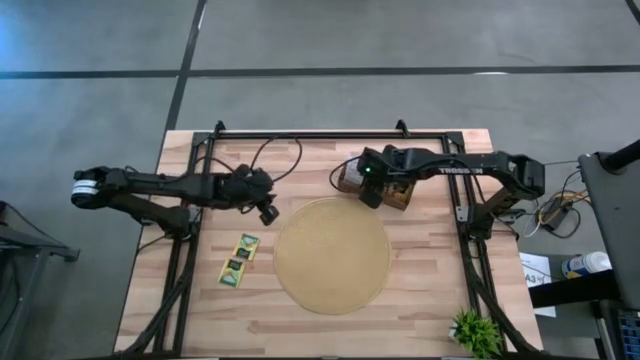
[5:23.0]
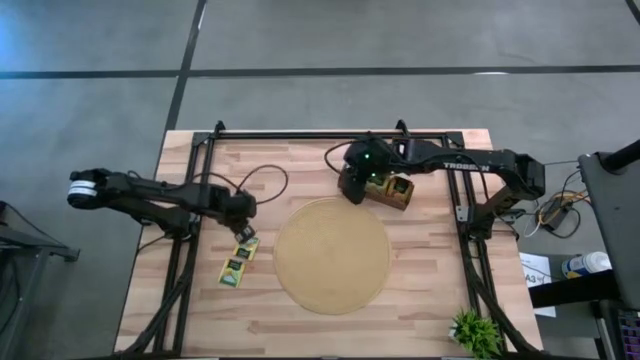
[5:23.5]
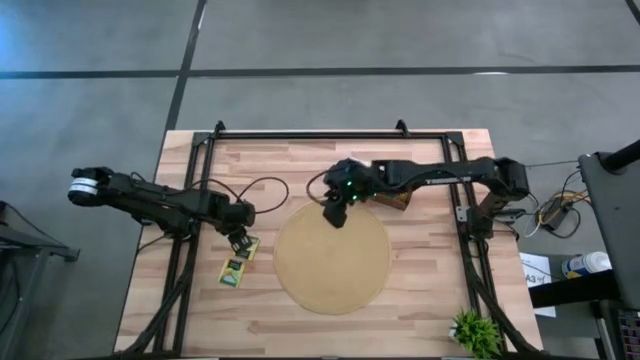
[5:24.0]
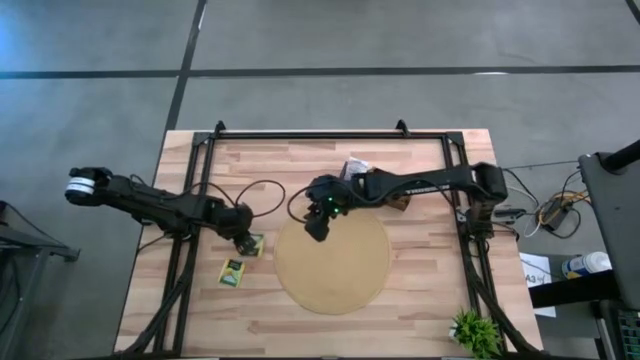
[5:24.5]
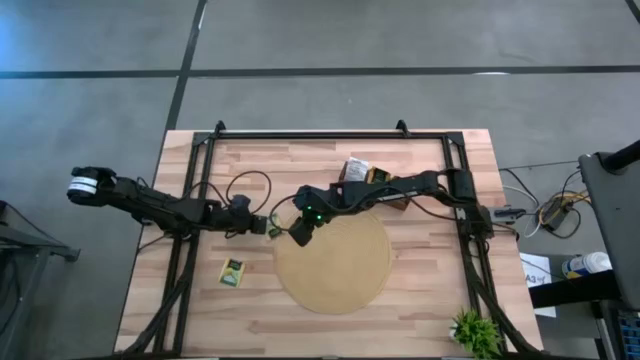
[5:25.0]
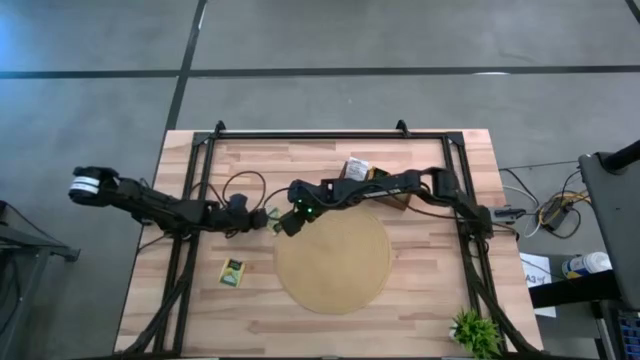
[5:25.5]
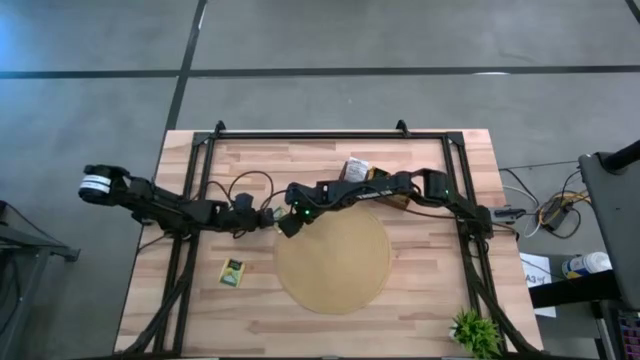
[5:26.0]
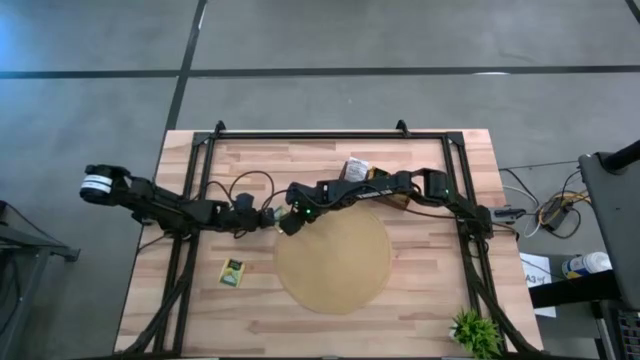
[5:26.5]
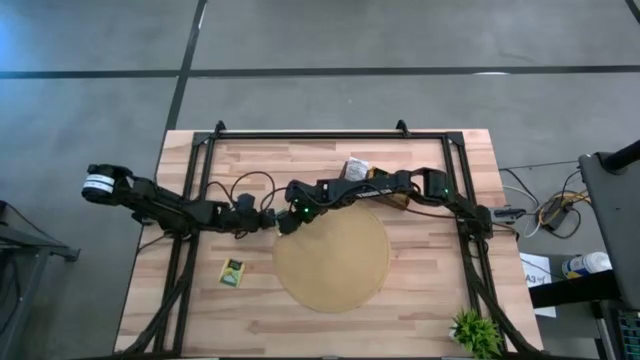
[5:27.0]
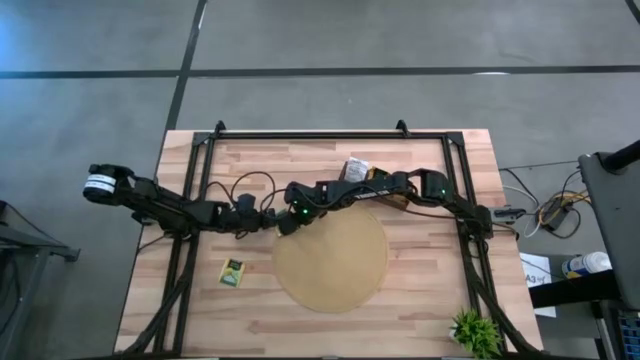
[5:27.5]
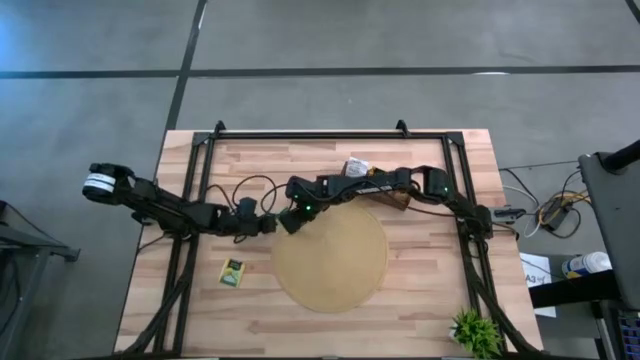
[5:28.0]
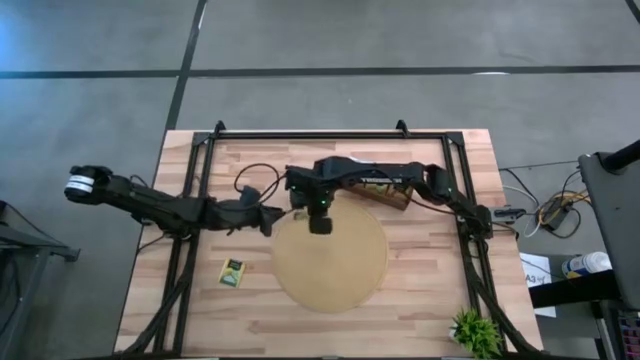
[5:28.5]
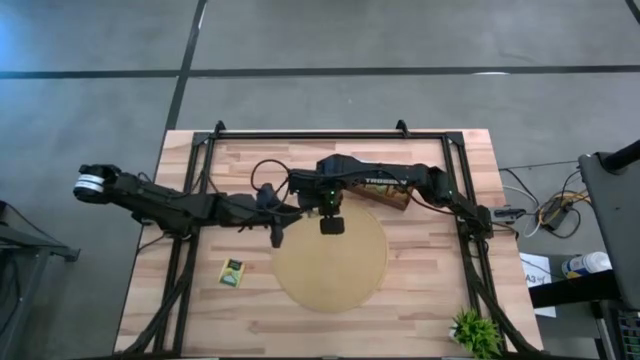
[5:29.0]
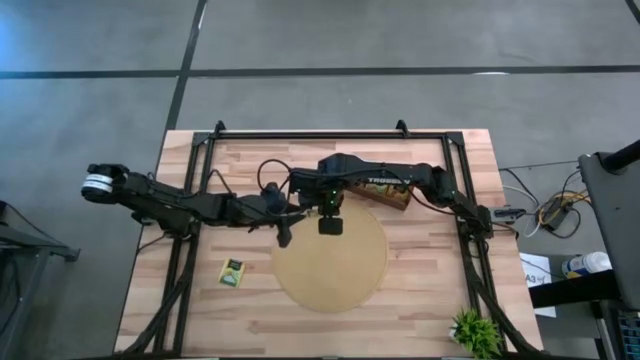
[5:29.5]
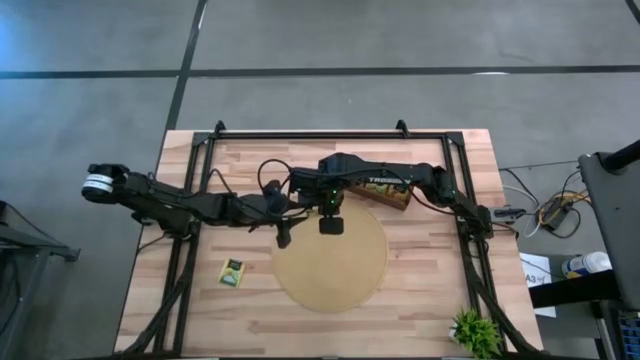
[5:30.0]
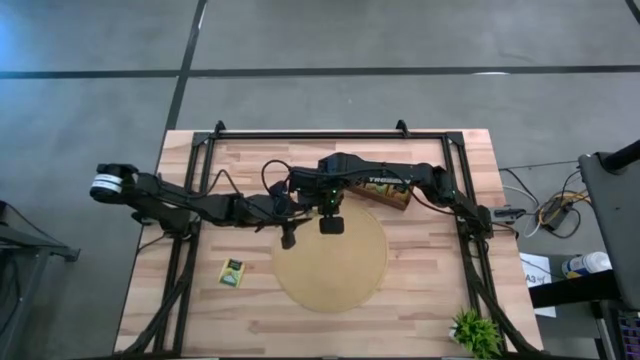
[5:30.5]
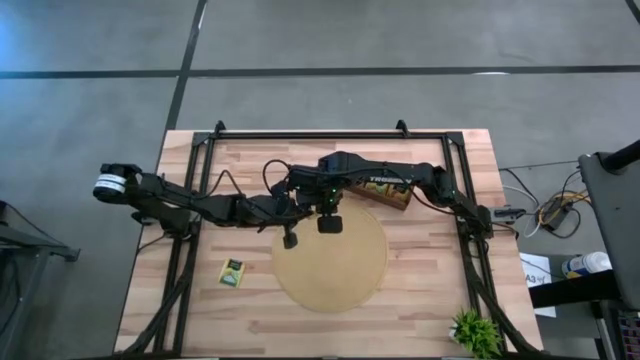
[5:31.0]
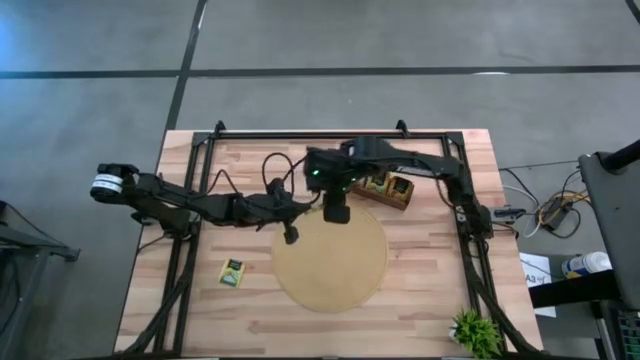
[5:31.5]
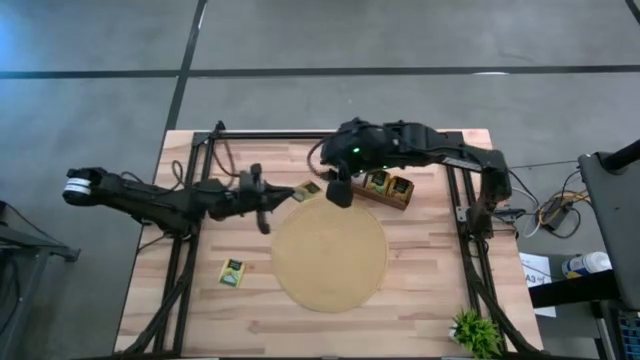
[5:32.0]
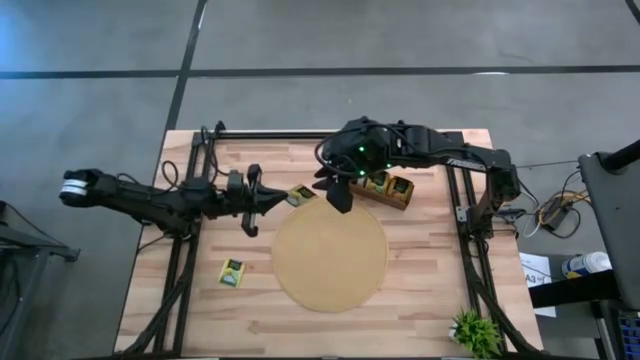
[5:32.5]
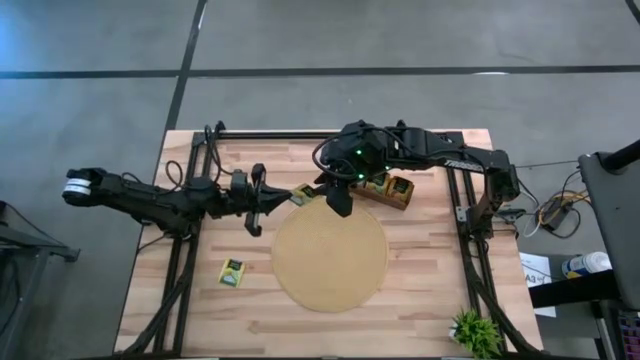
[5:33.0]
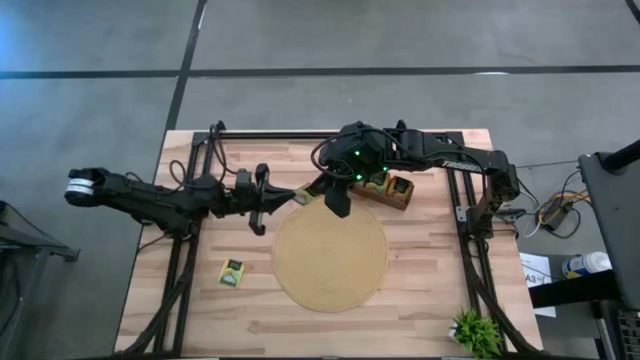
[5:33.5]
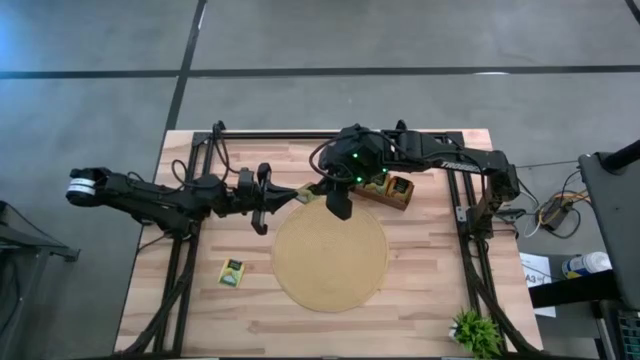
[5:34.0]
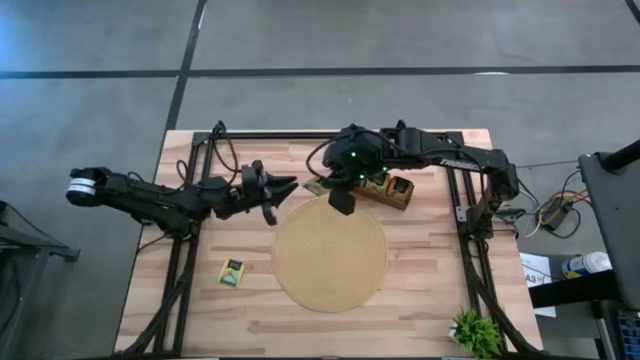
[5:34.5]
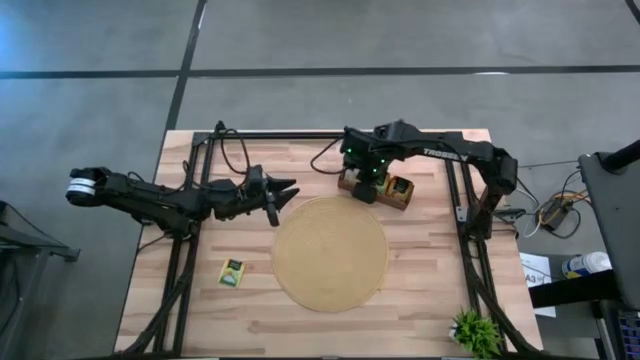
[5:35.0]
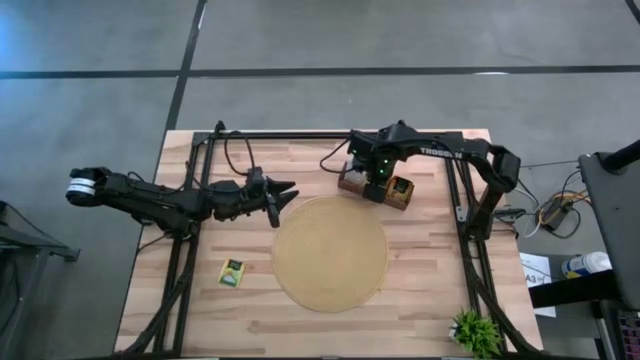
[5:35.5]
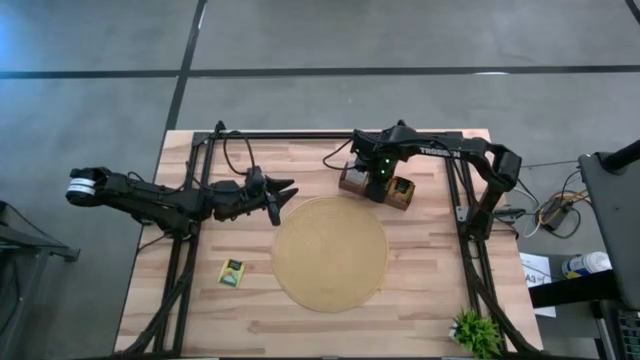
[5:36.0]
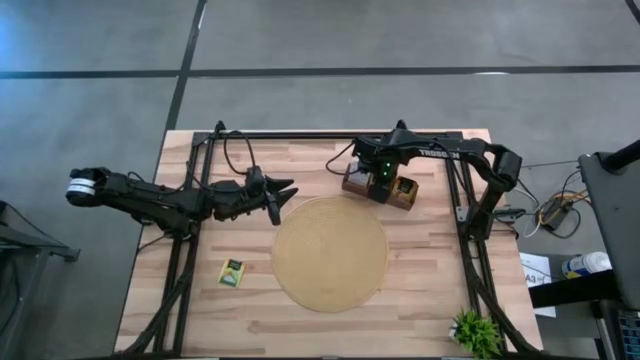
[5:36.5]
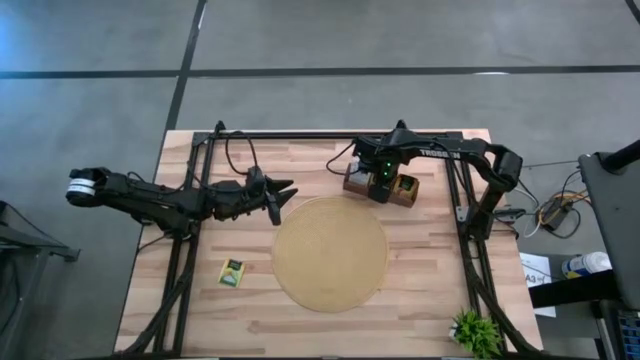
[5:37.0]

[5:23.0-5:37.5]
Task: Pick & Place Tea
Put the lemon tea bag into the middle section of the wooden organizer

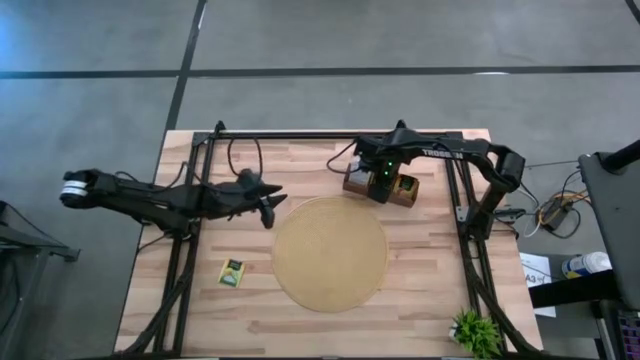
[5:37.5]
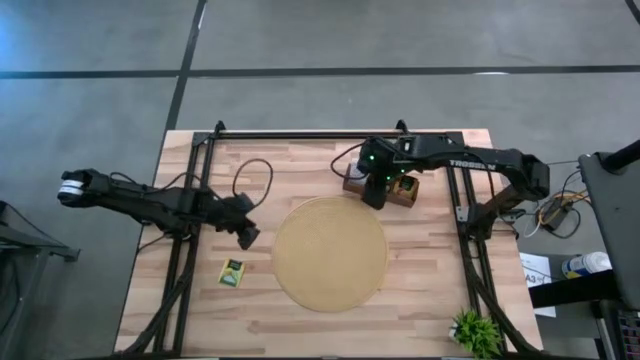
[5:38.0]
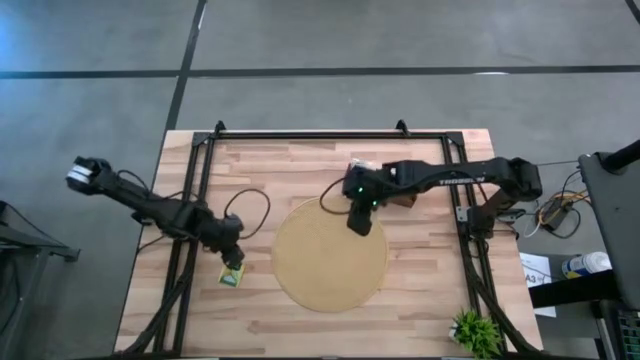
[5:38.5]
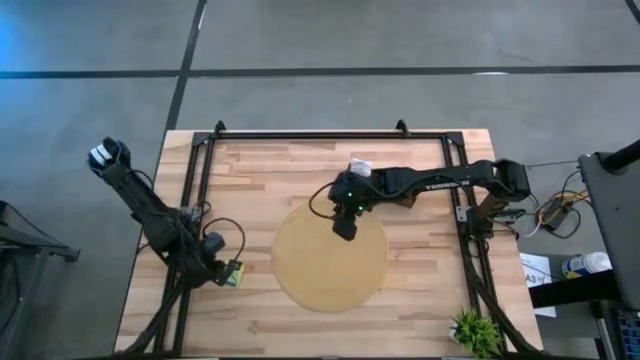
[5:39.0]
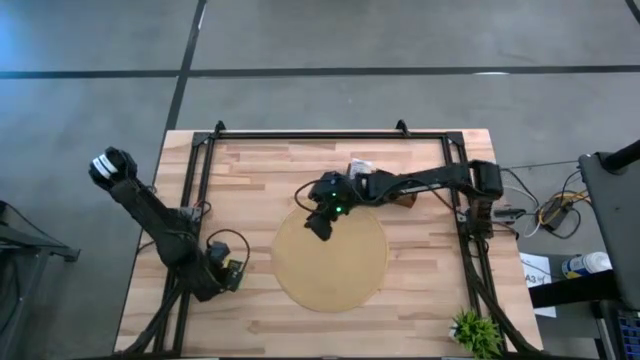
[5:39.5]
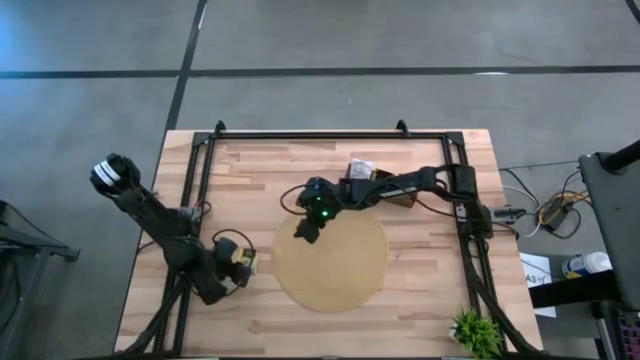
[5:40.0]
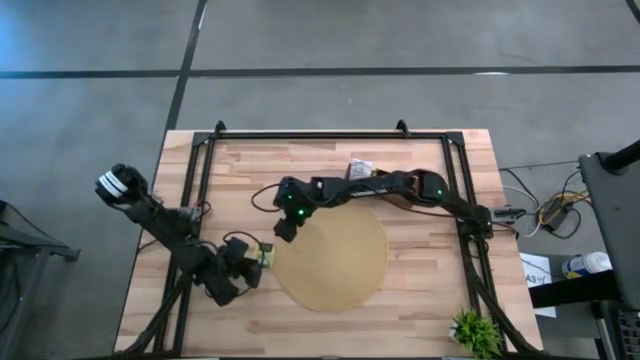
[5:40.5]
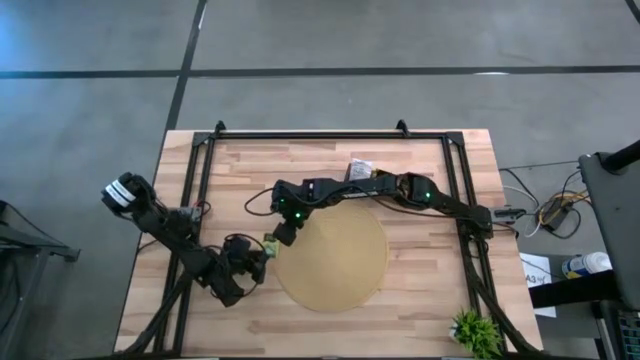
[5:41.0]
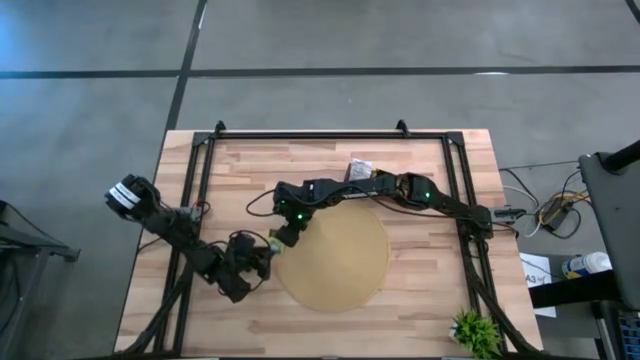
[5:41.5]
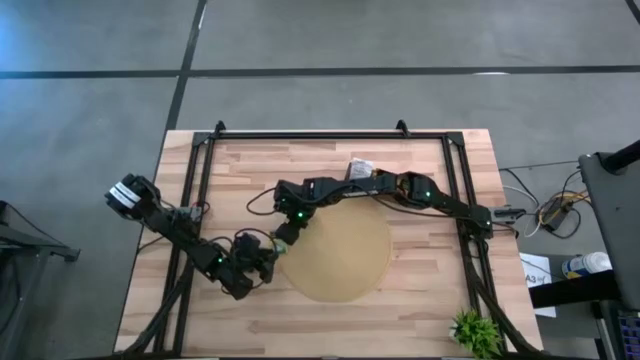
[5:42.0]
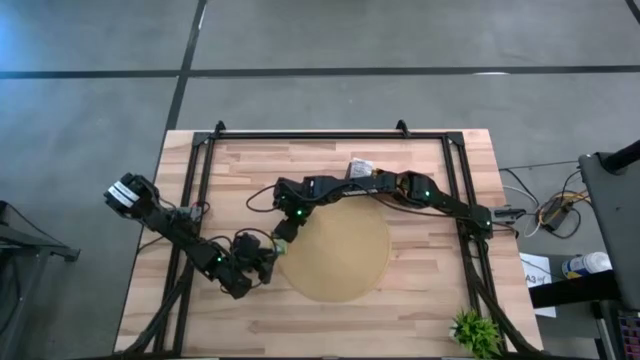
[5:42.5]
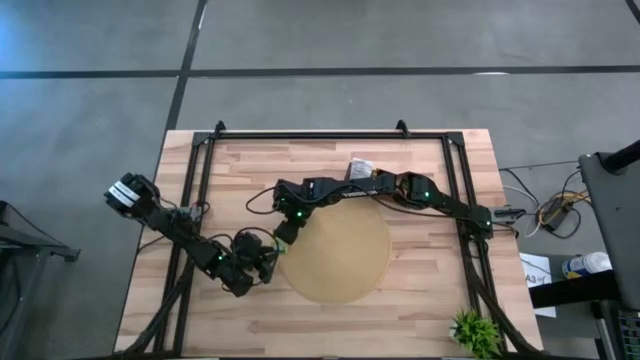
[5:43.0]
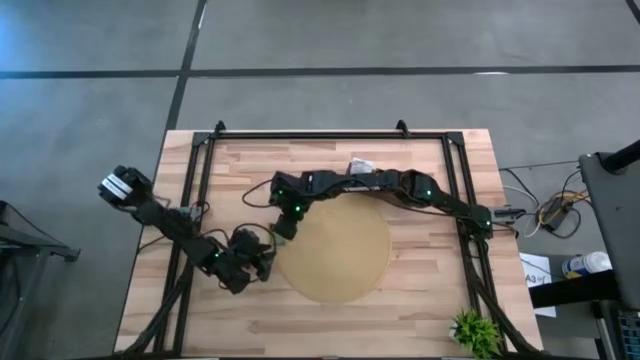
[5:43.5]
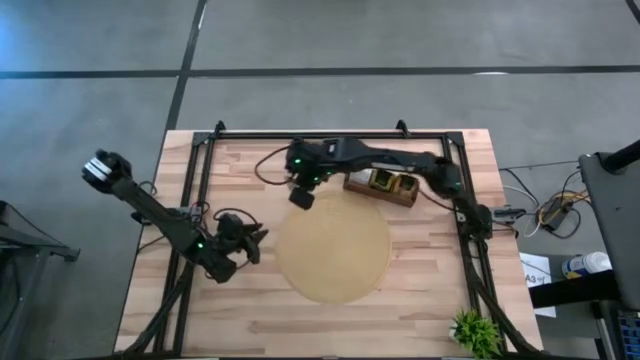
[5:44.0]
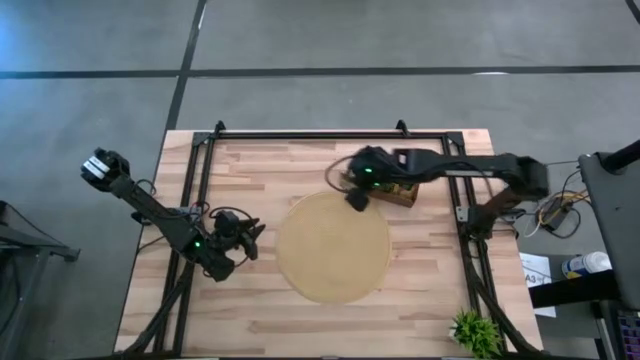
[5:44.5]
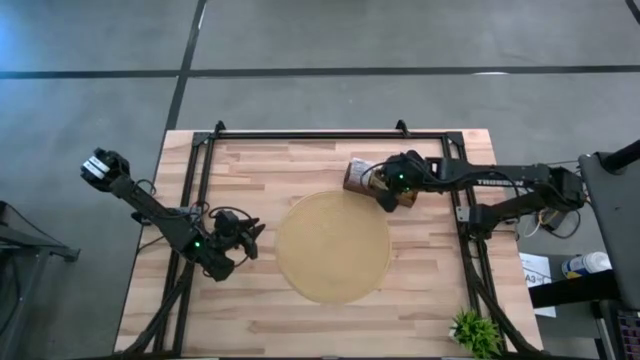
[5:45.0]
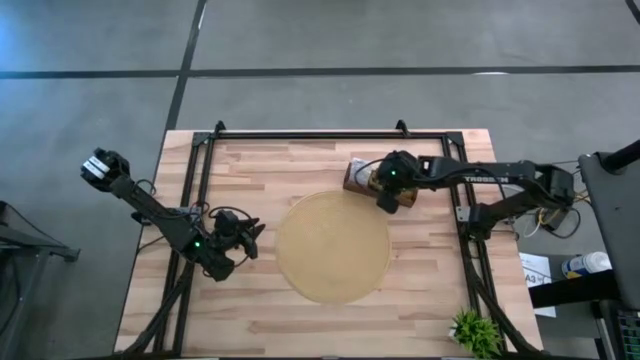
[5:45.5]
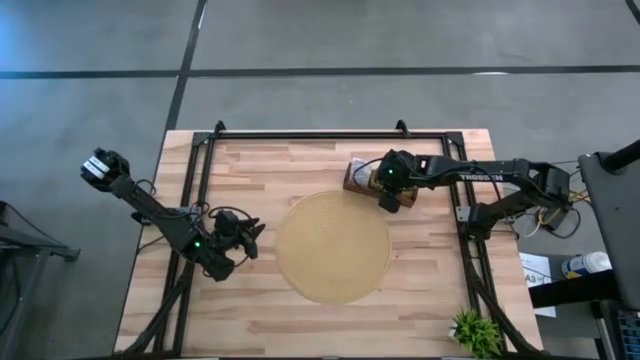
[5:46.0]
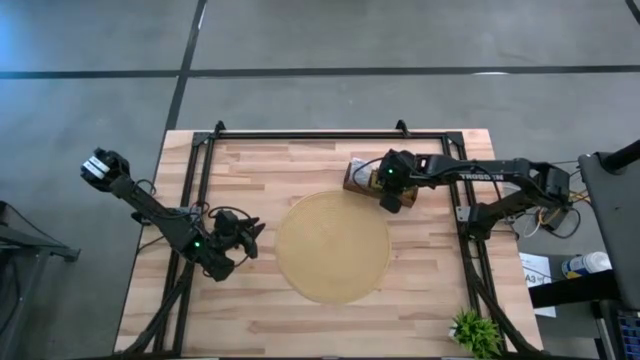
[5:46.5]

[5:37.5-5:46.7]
Put the lemon tea bag into the middle section of the wooden organizer
